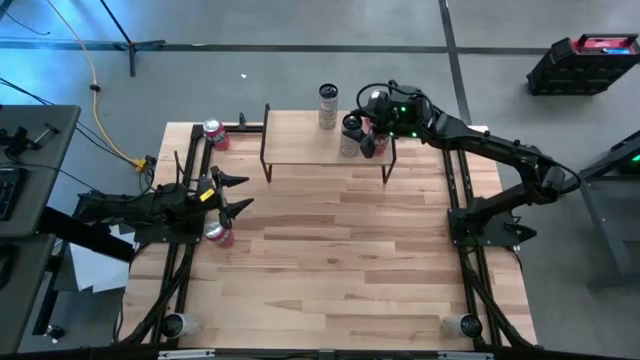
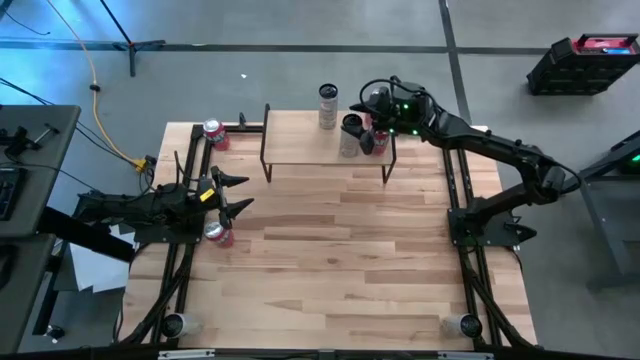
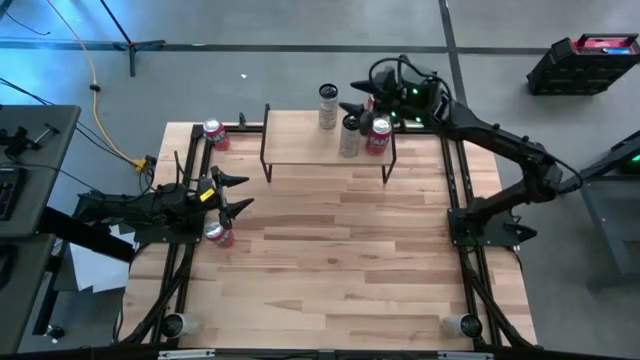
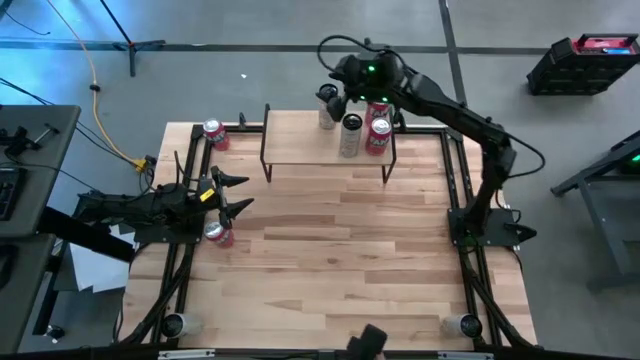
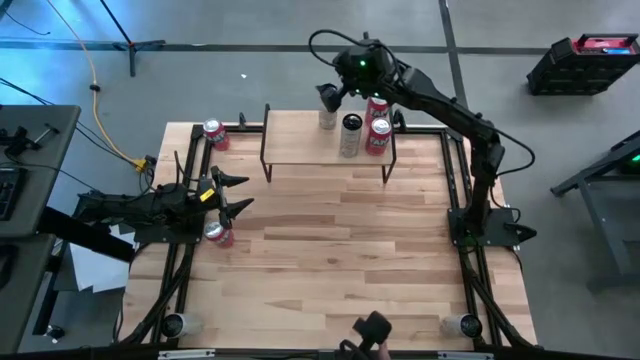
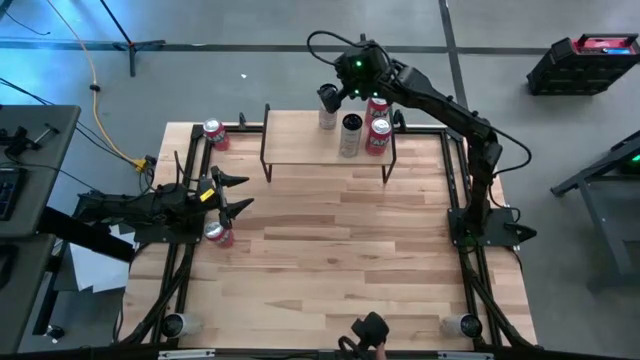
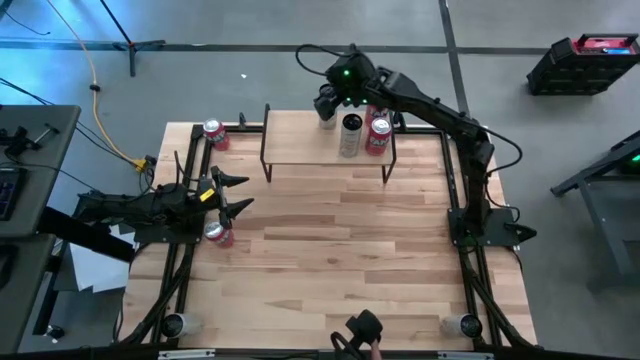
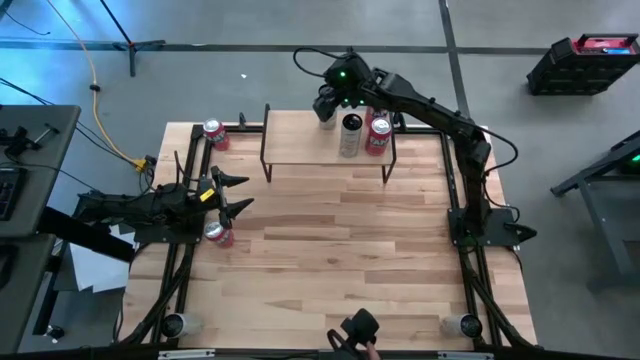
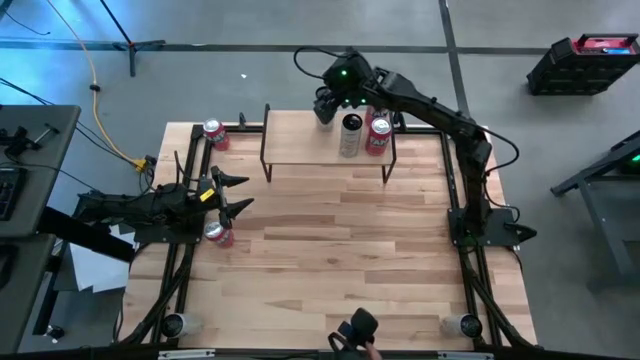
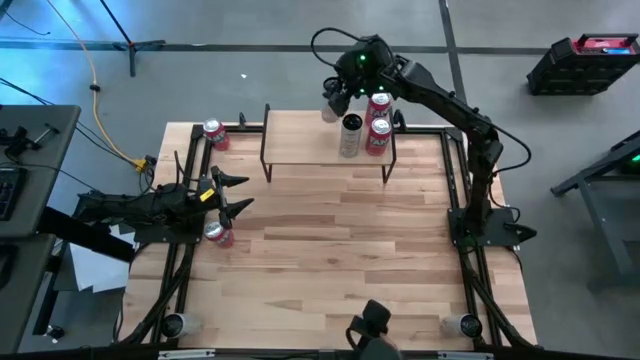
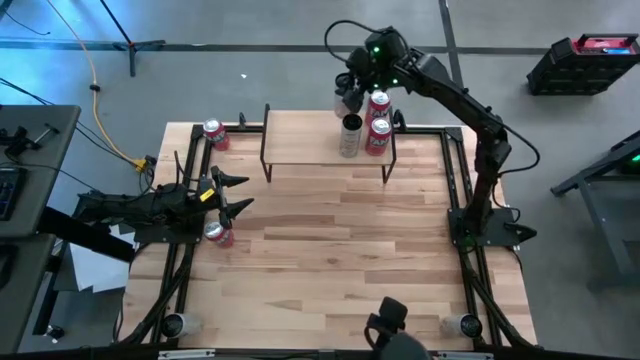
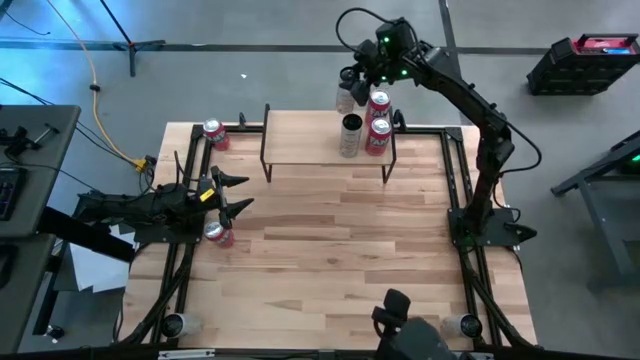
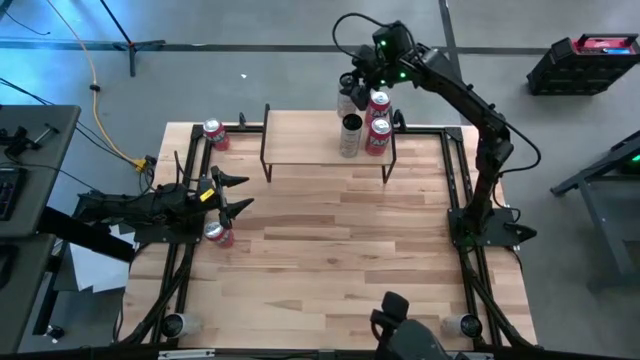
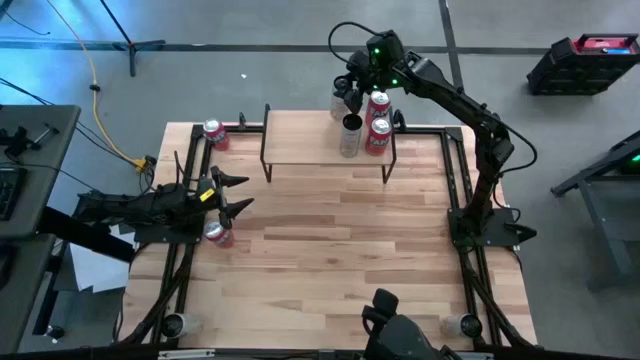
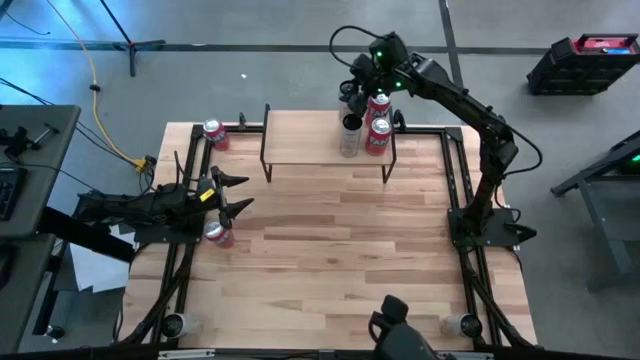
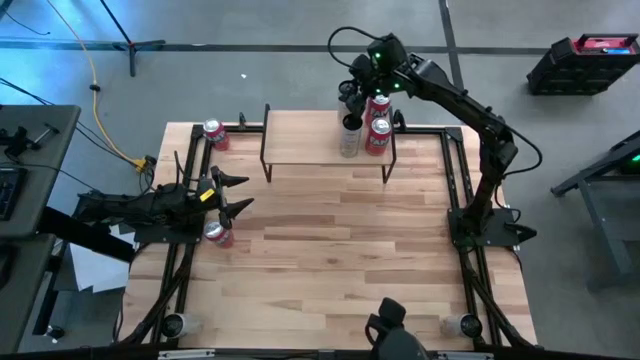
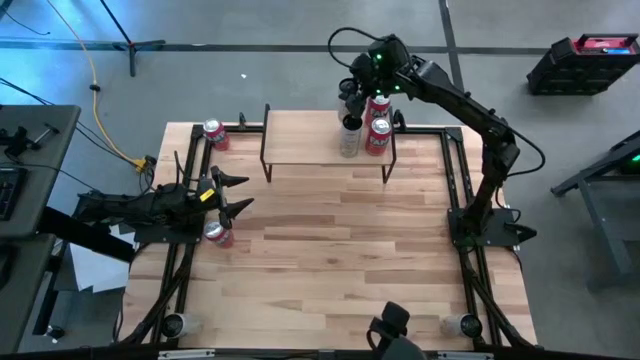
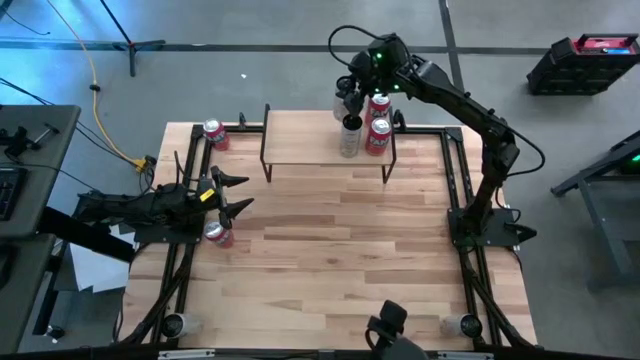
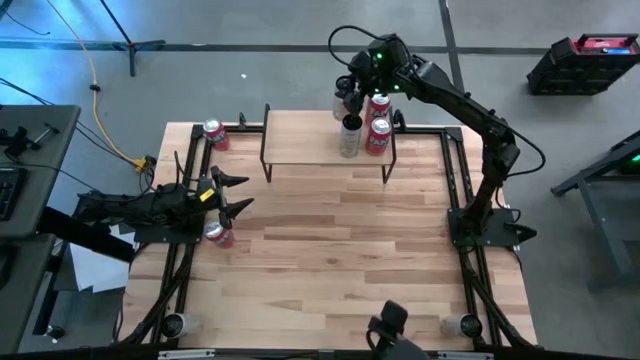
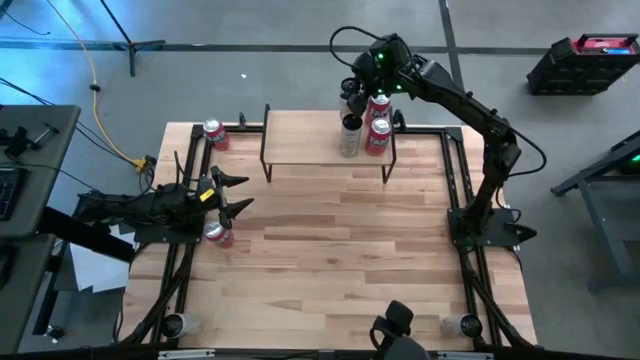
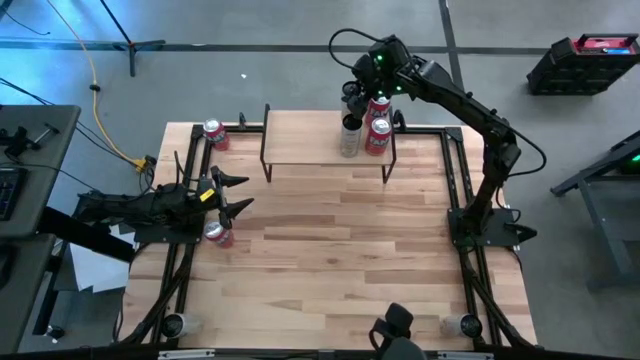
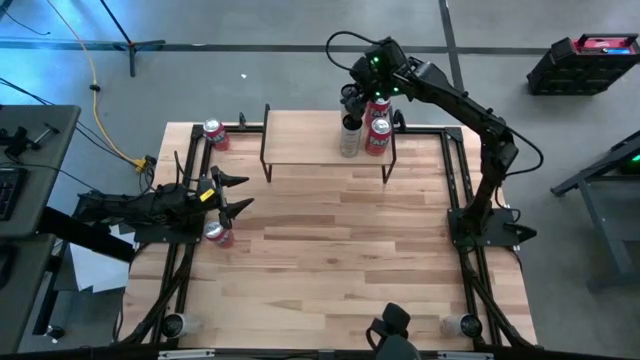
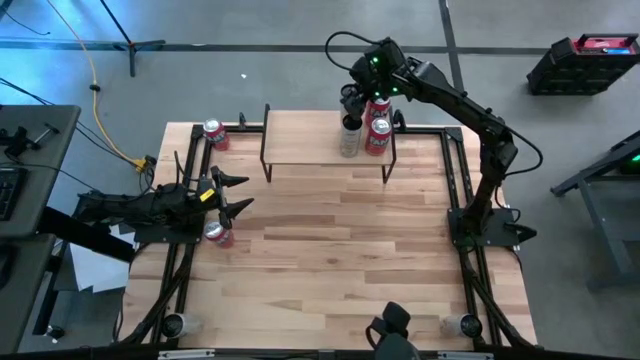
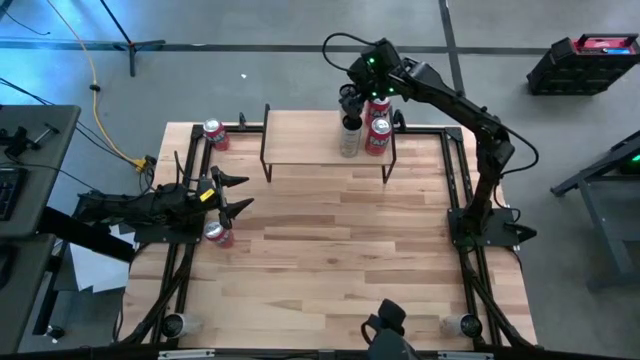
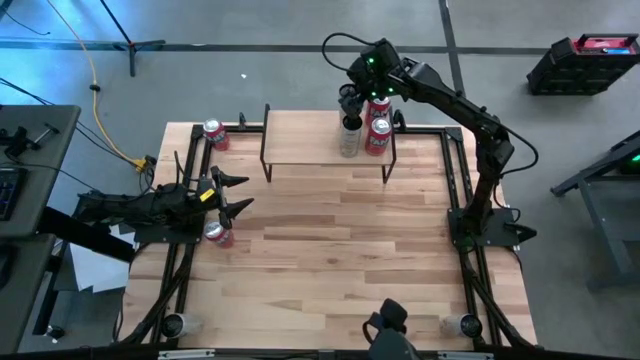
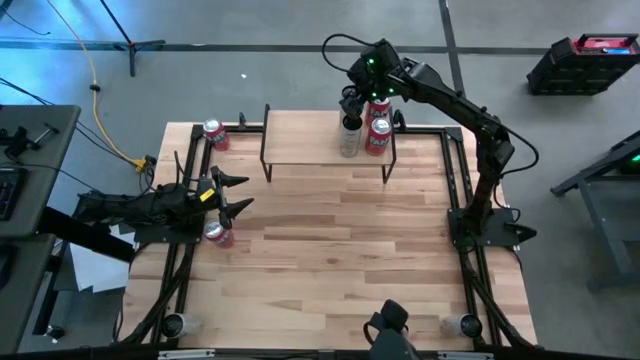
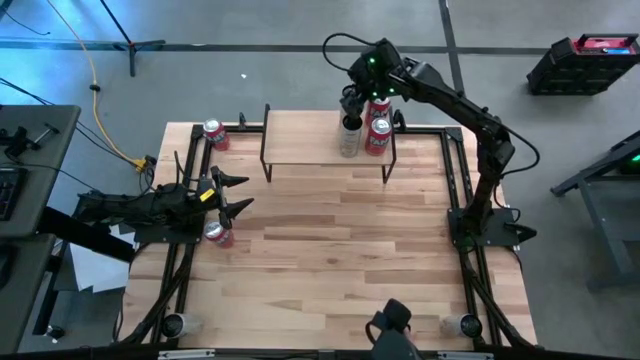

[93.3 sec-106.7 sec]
Task: Place canned beverage on shelf
Adjust the top white soda can on the shelf

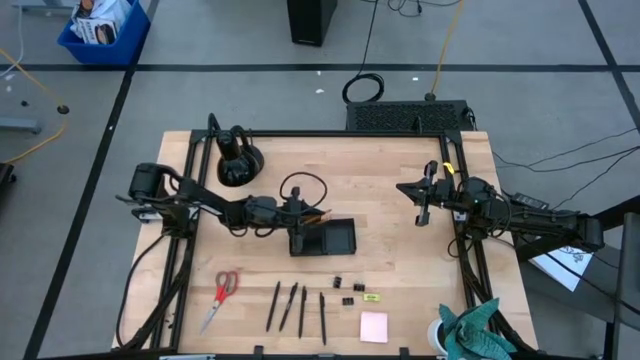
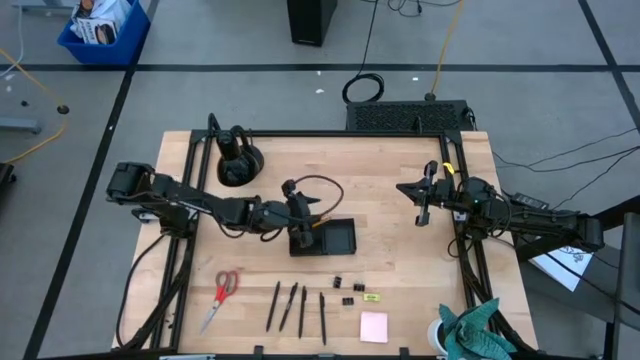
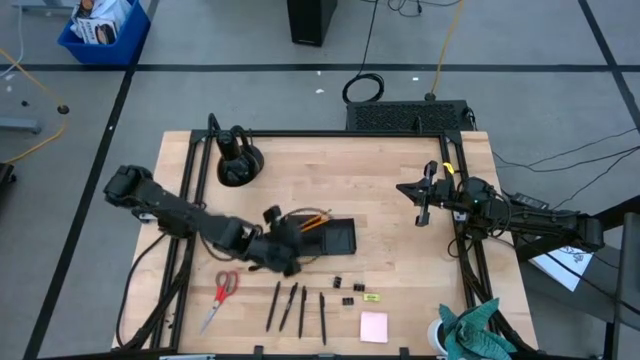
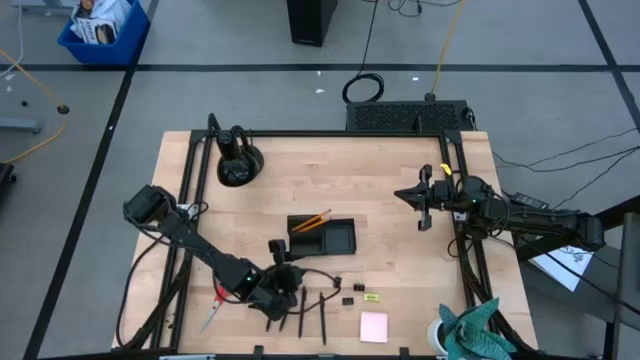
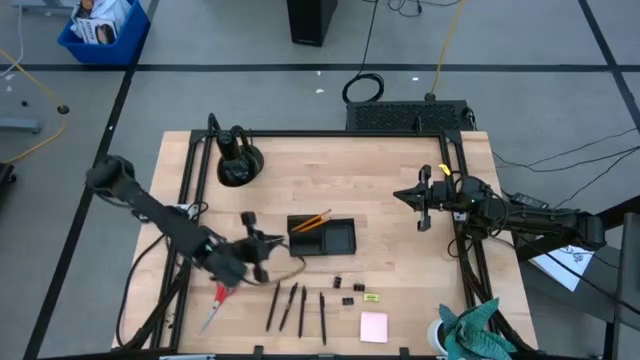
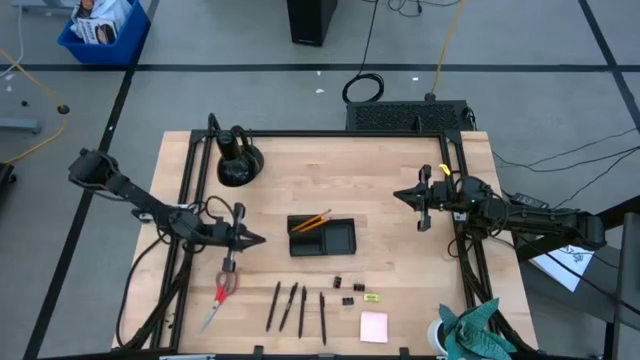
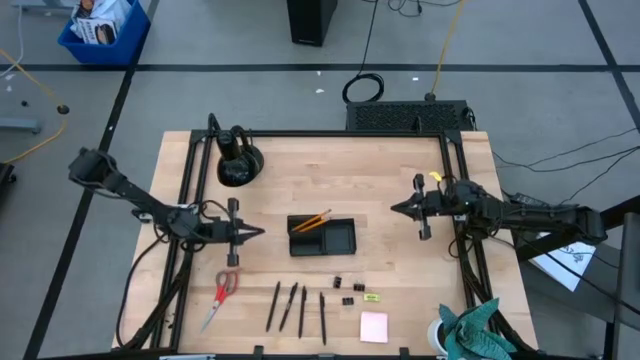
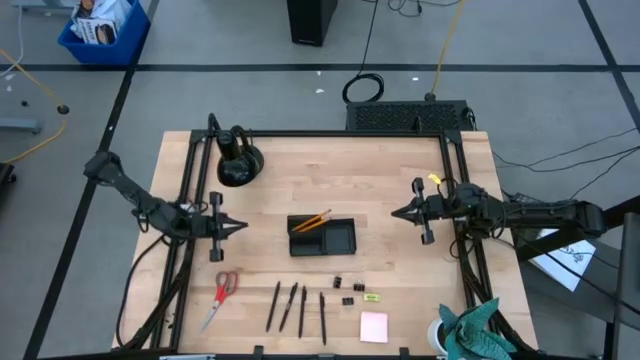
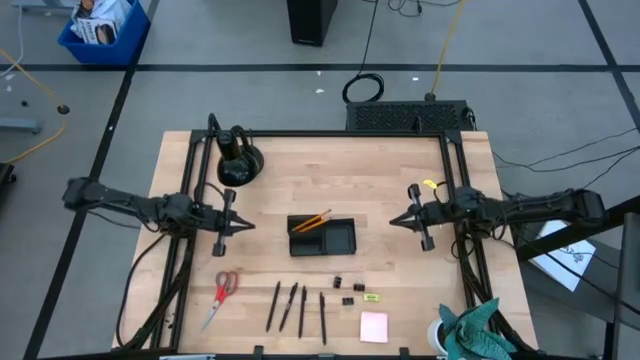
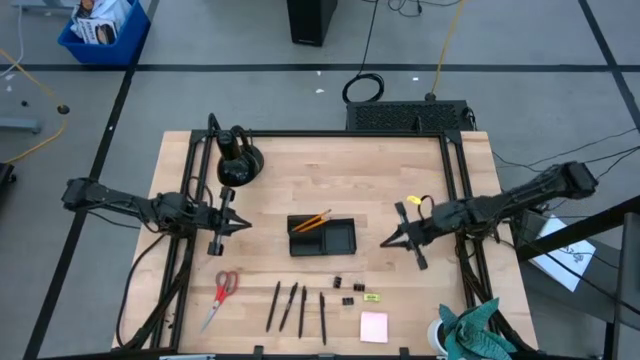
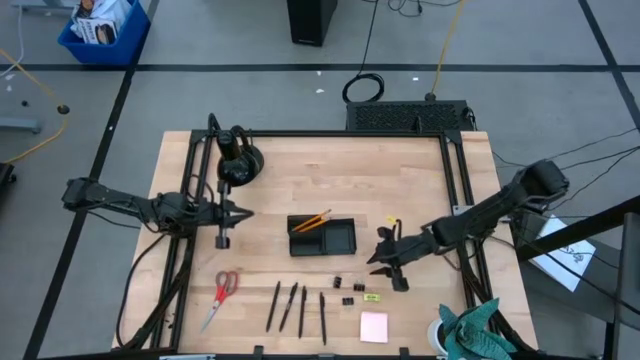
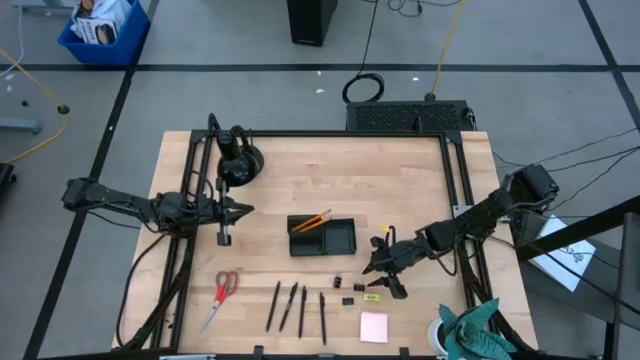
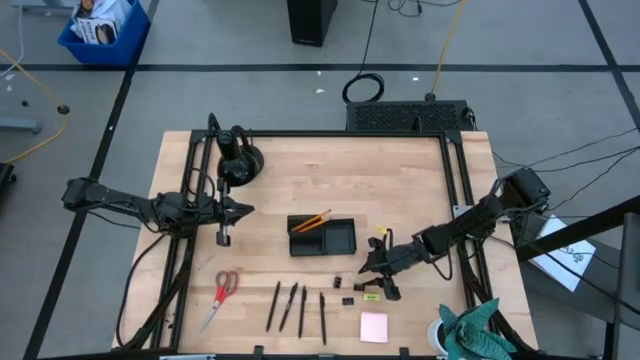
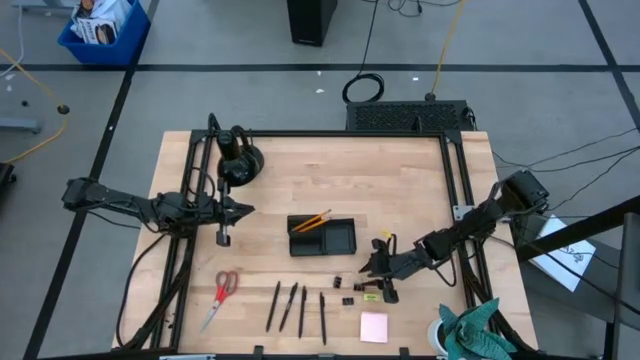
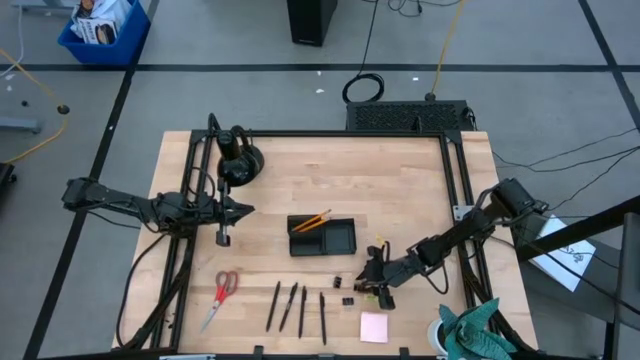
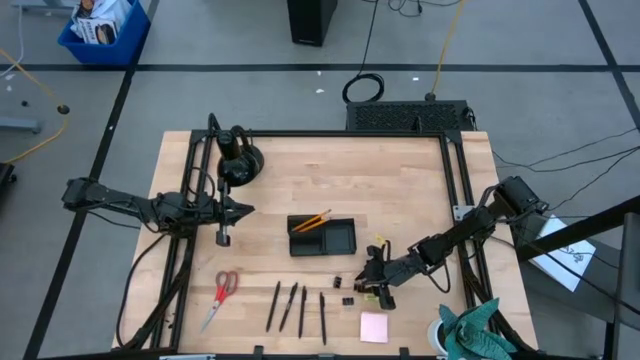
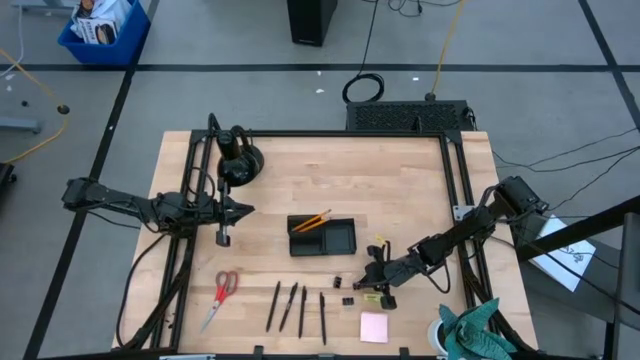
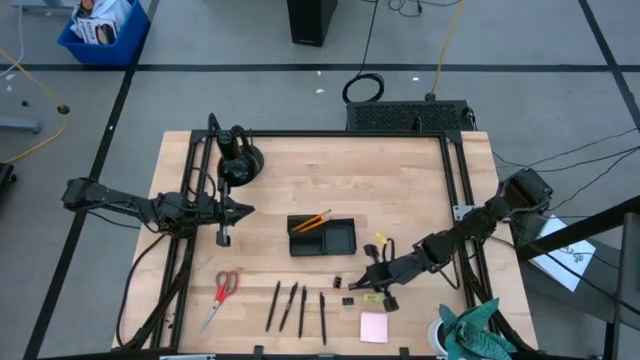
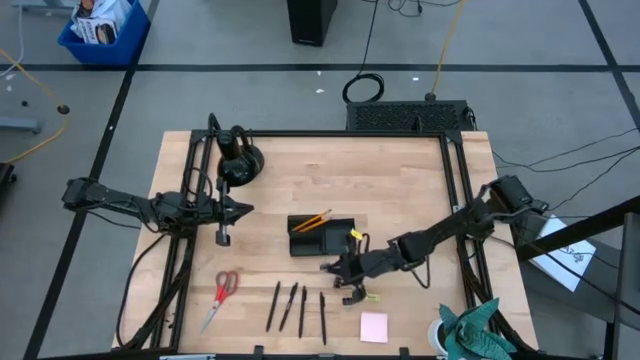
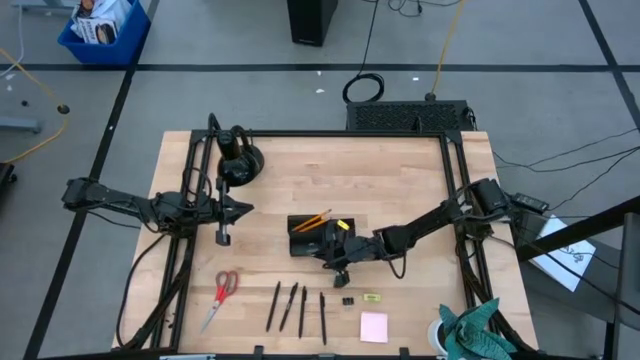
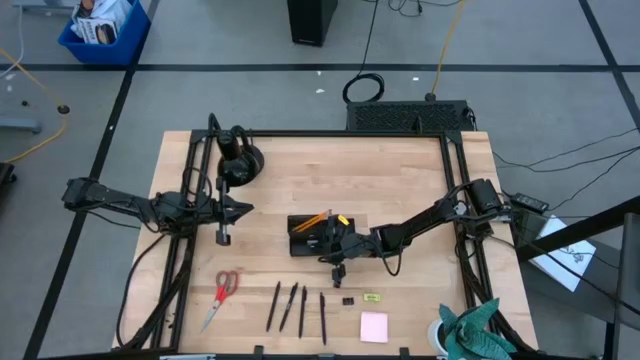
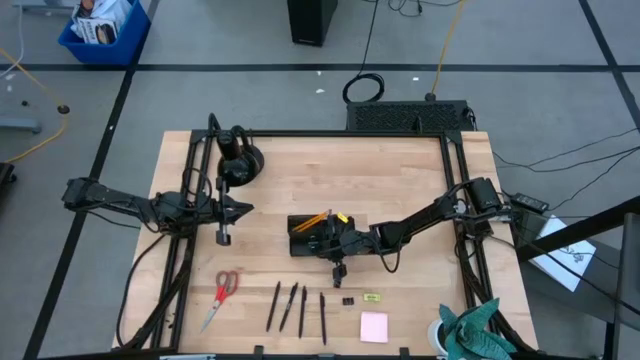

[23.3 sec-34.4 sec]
Task: Pick and place office supplies into organizer
Put the black binder clip into the black desk organizer
